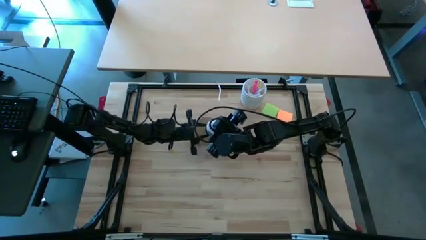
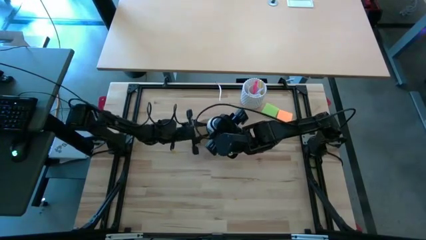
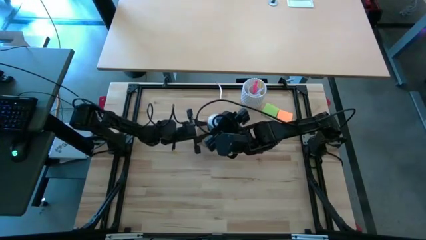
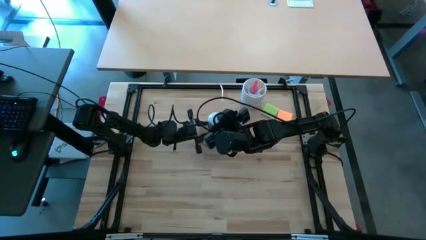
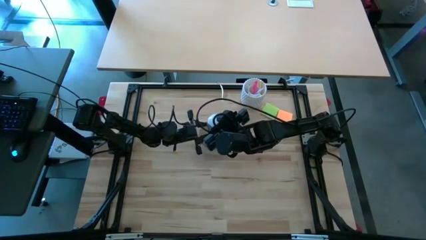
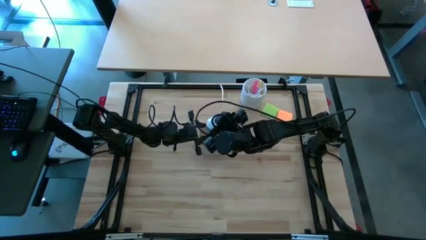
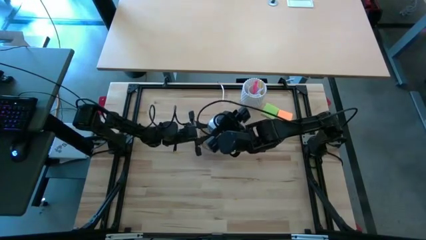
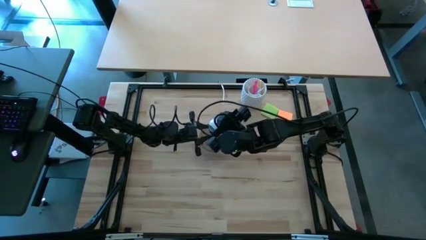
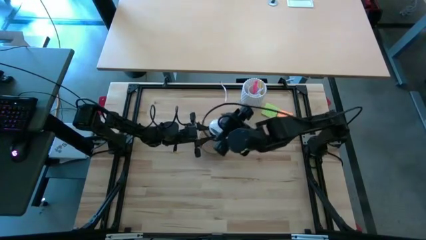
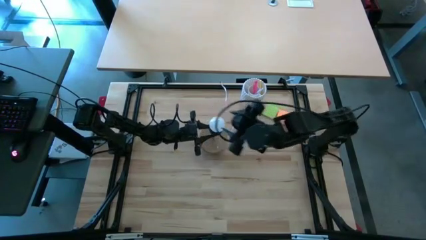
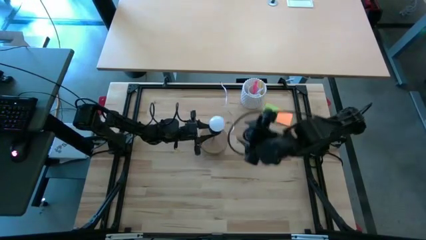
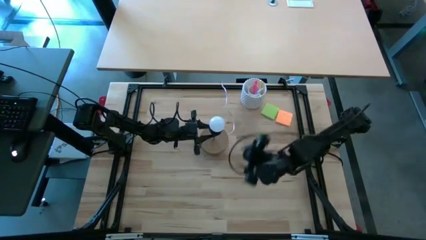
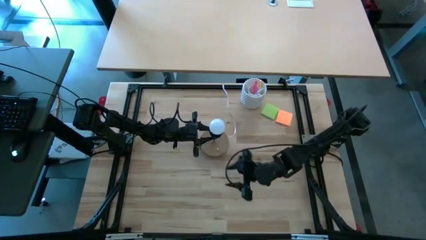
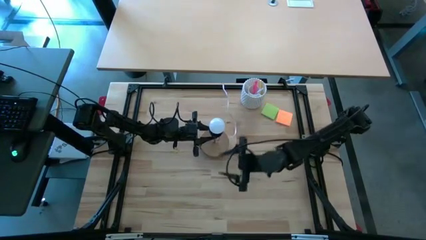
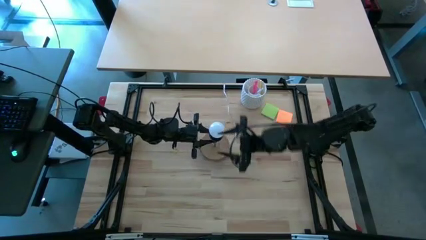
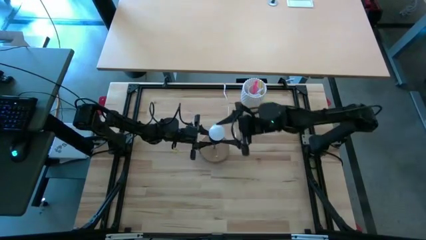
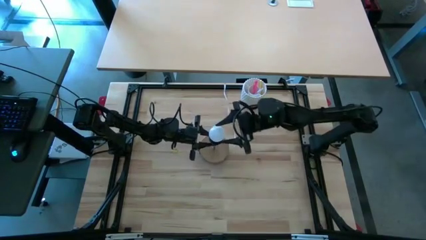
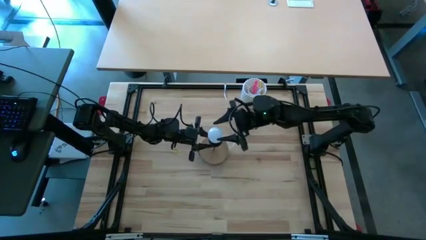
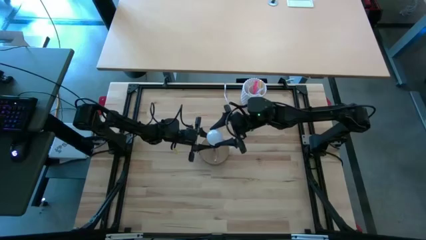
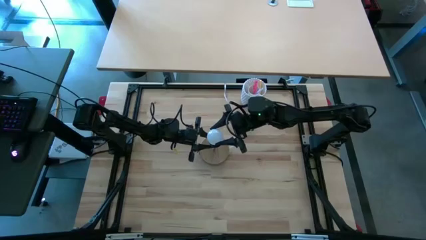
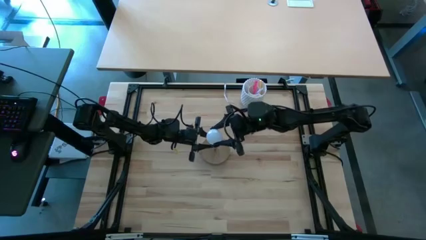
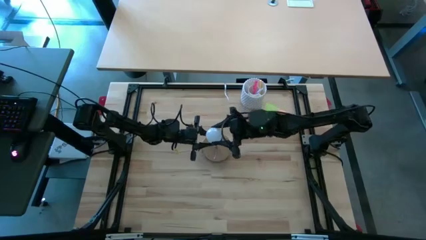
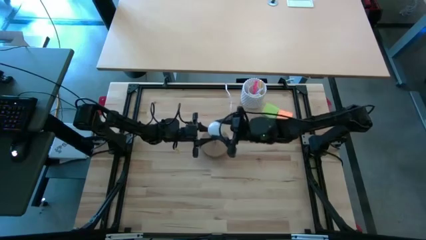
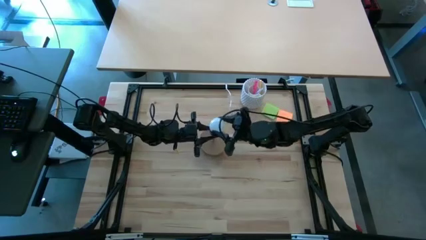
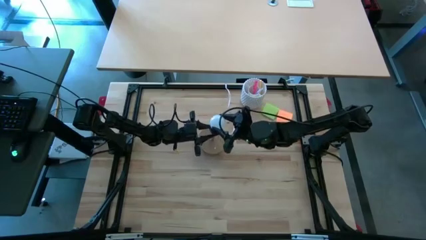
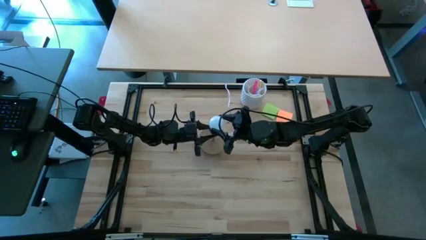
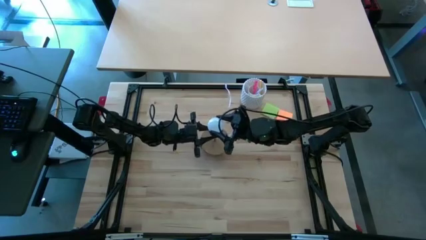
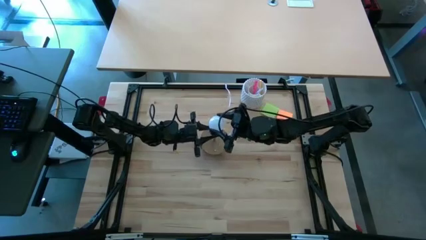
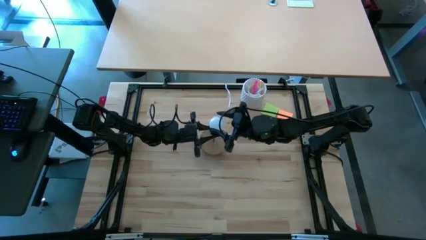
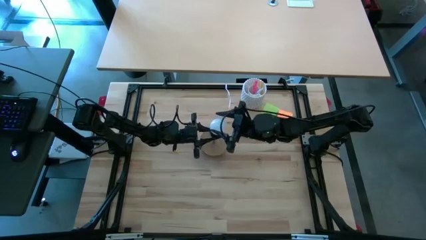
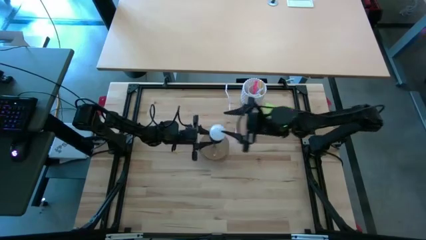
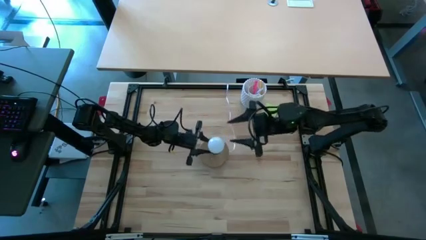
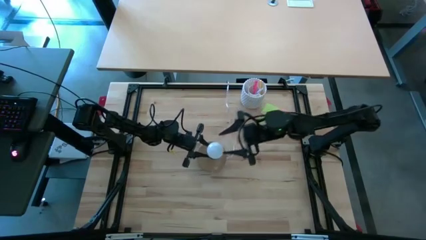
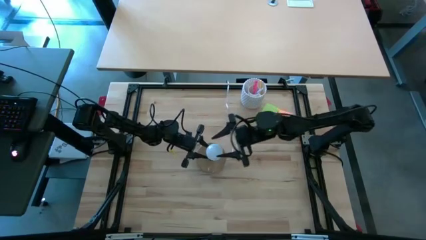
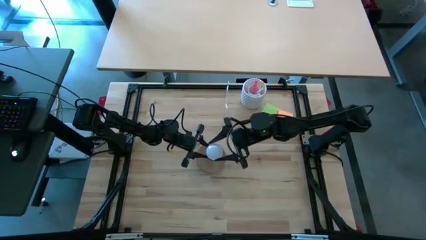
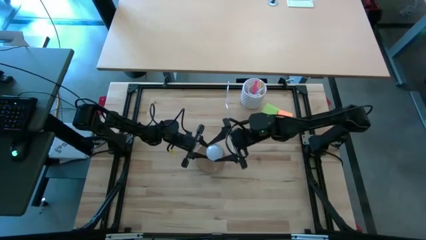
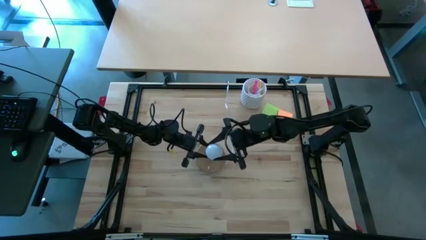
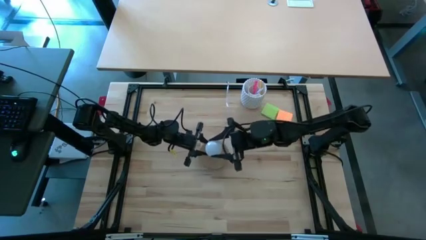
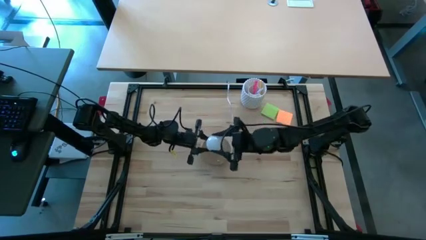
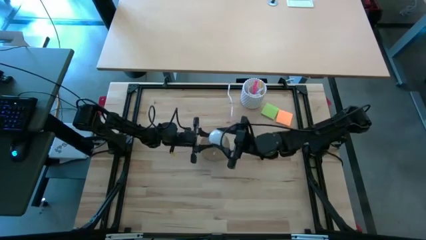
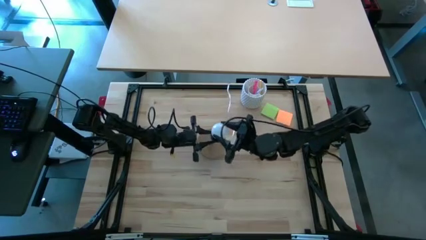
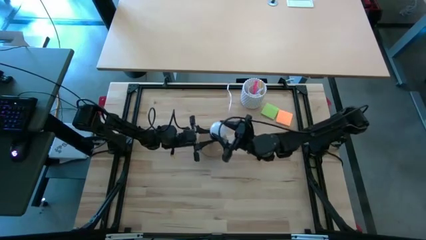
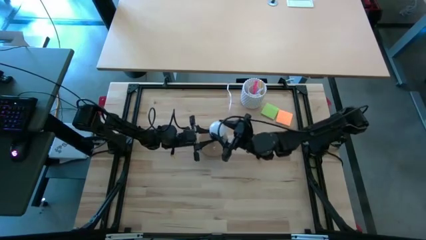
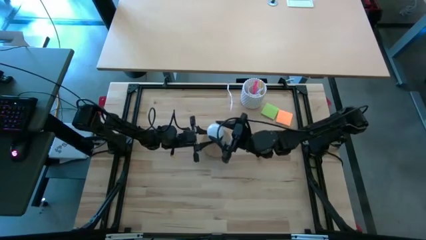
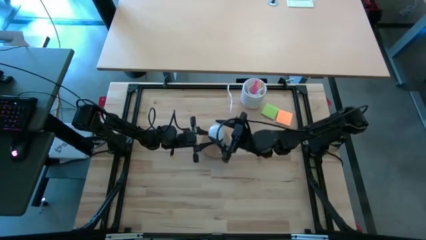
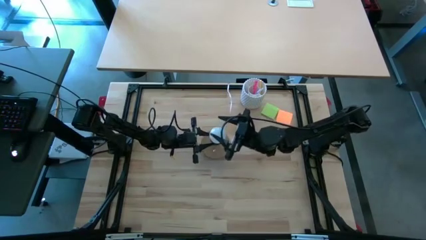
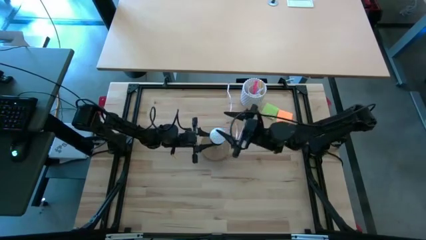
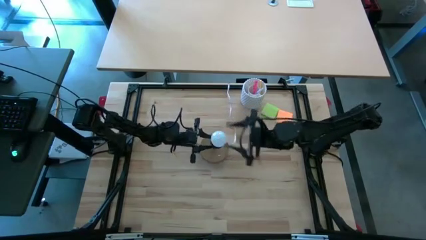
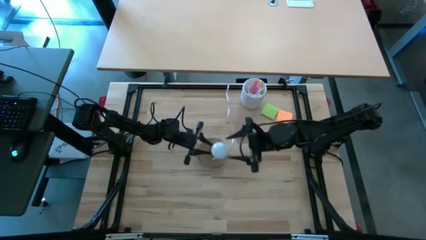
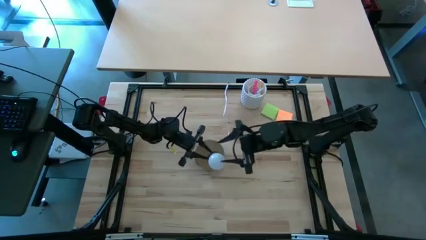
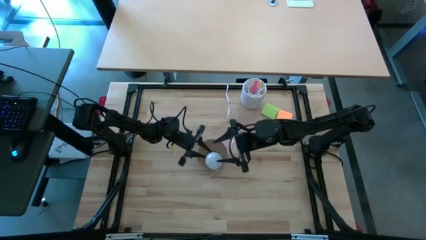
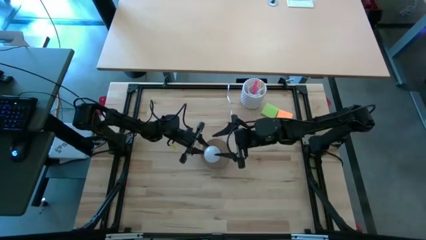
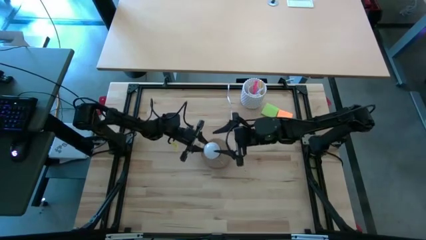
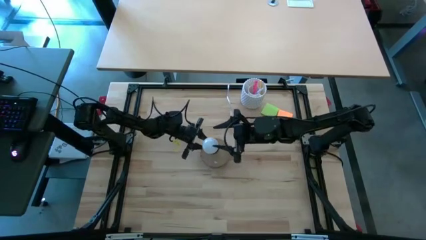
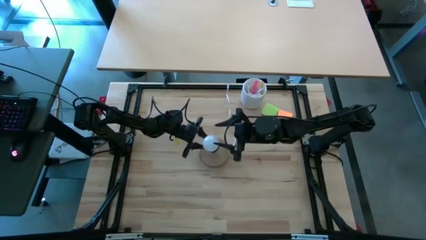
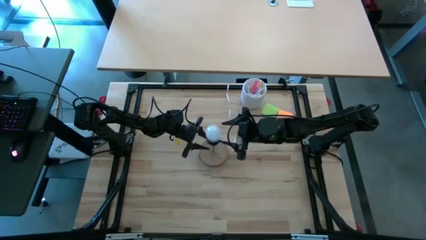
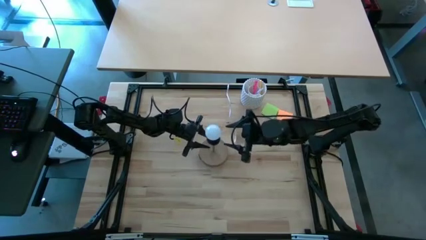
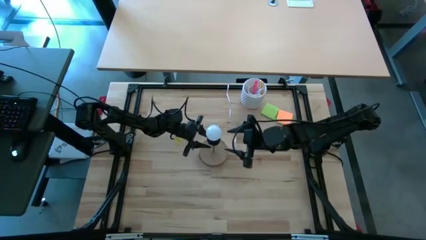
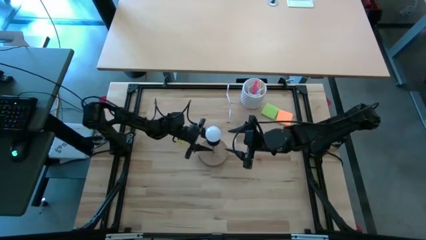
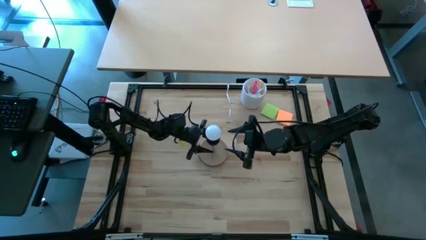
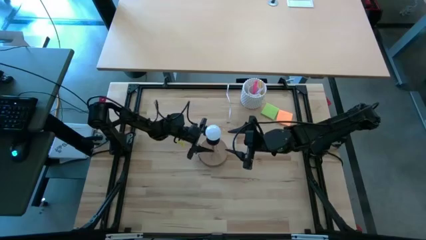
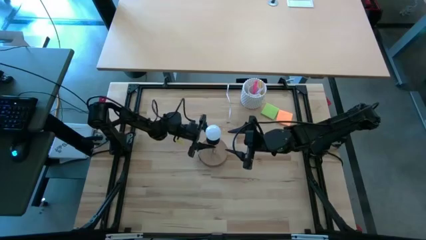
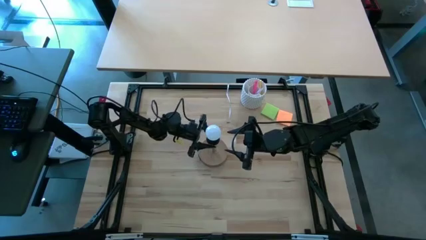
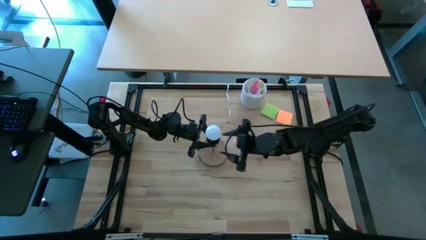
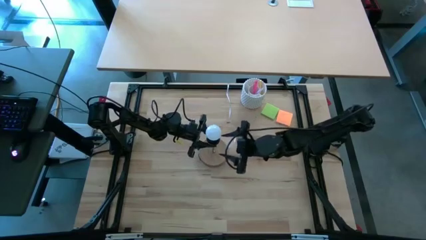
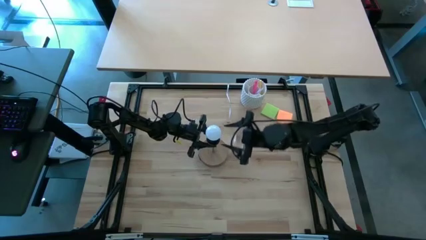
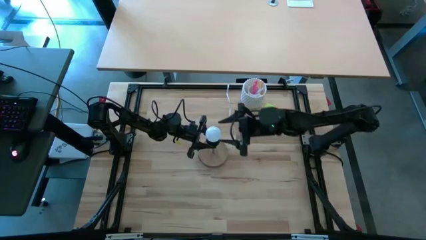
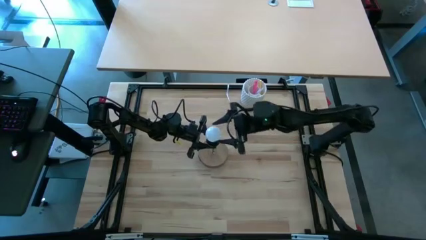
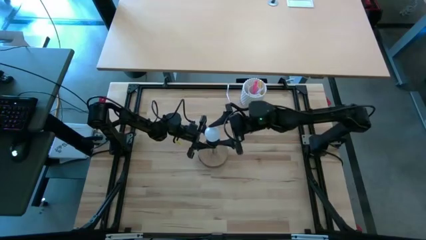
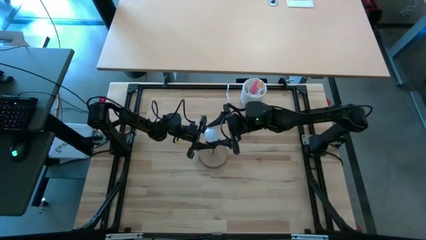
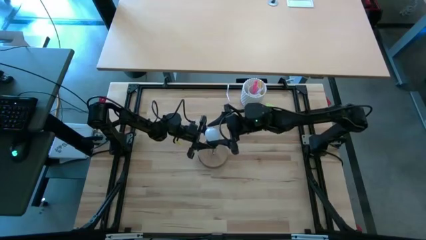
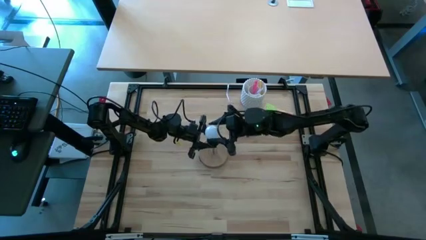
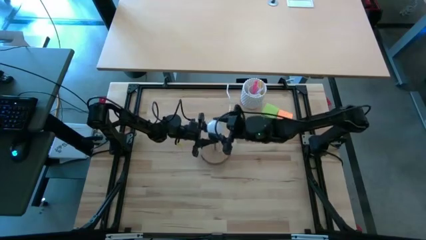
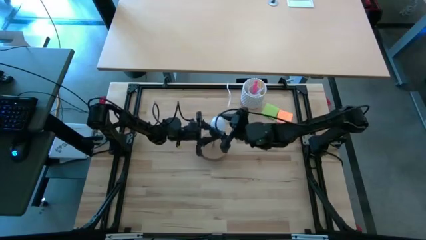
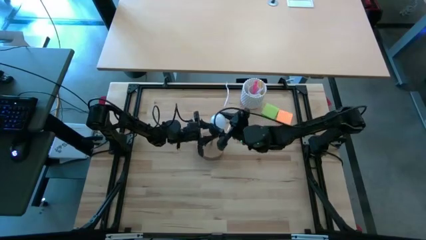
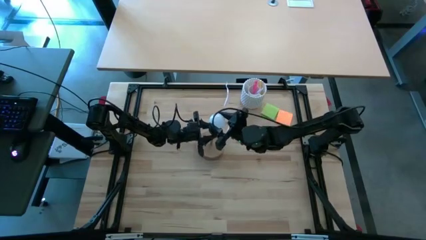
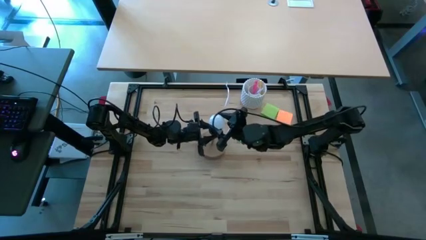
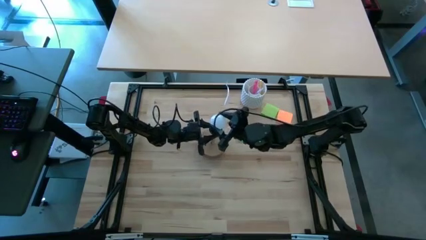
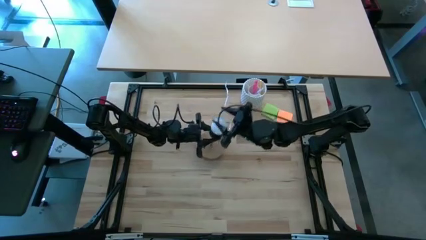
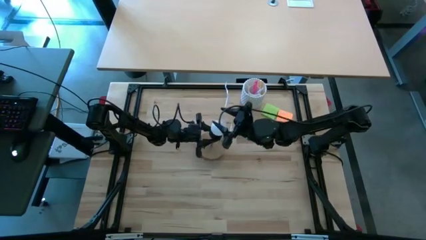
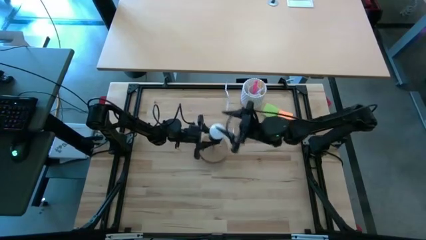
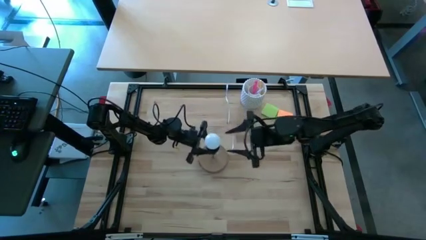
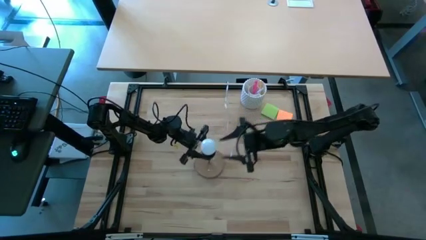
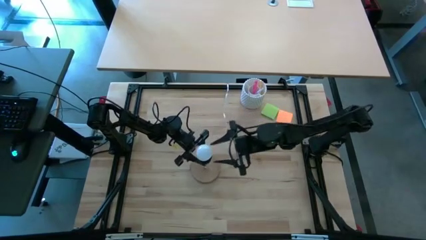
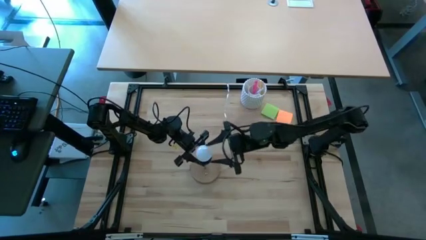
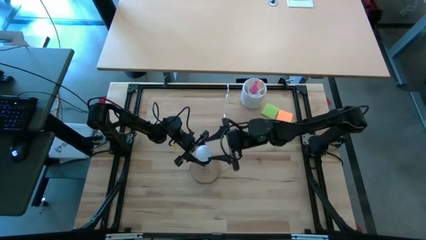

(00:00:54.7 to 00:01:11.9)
Task: Screw lightbulb
Insert the white lightbulb into the desk lamp
